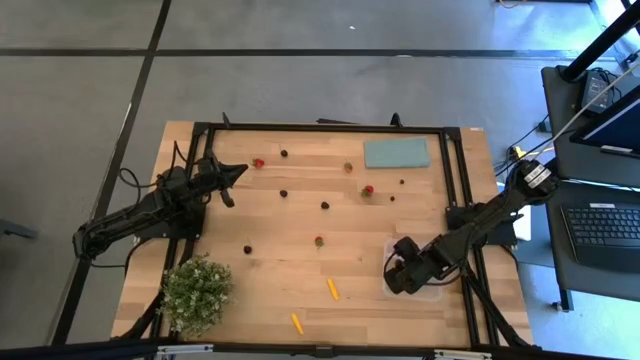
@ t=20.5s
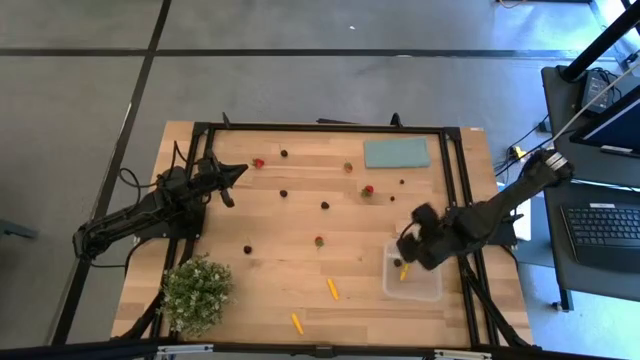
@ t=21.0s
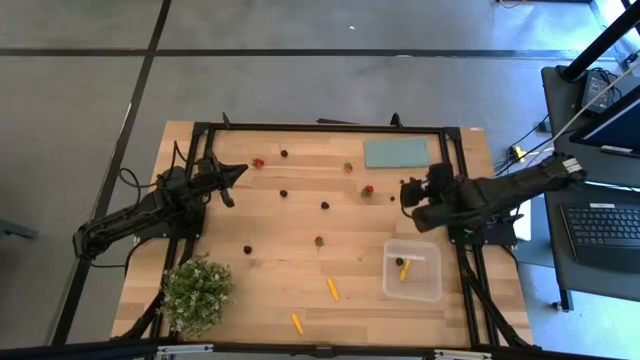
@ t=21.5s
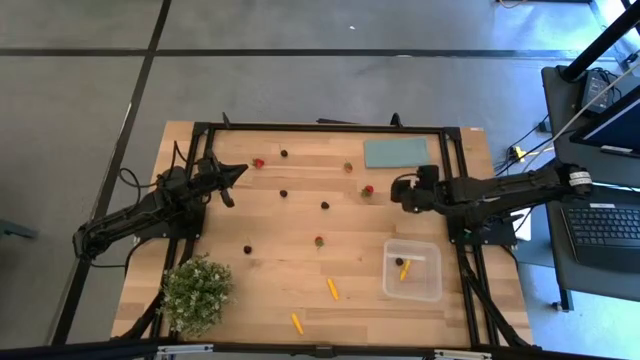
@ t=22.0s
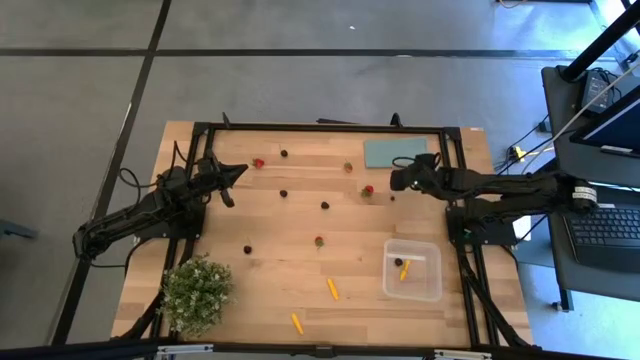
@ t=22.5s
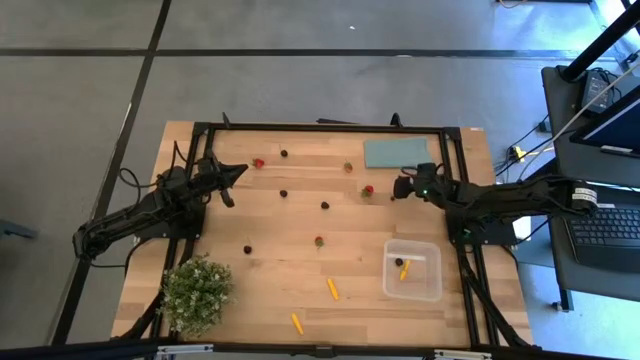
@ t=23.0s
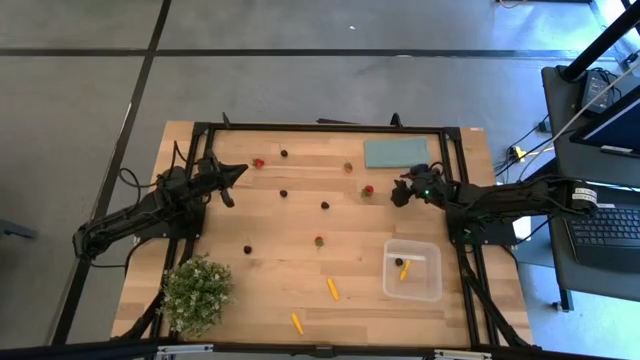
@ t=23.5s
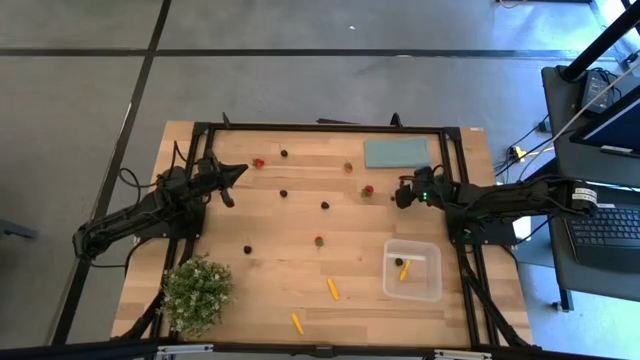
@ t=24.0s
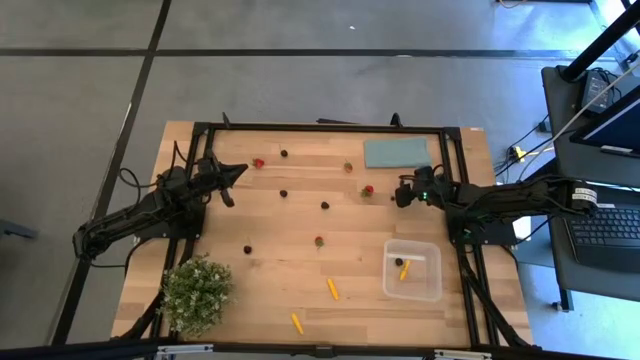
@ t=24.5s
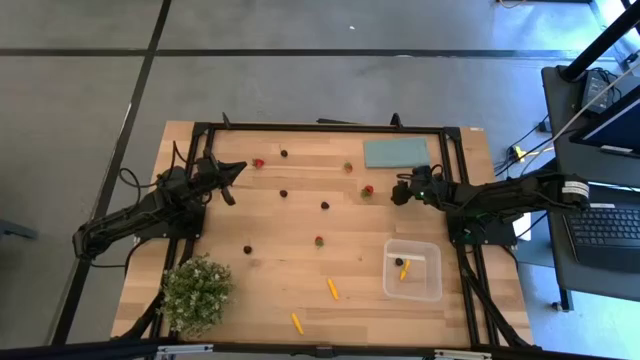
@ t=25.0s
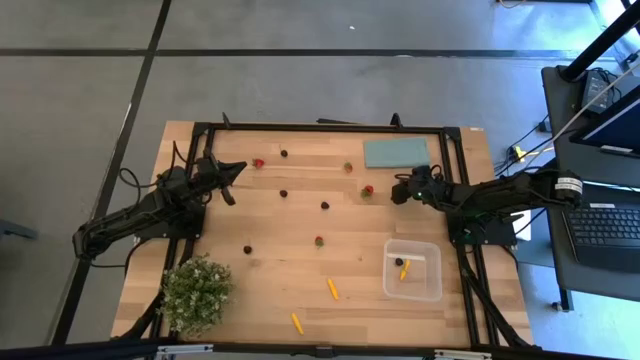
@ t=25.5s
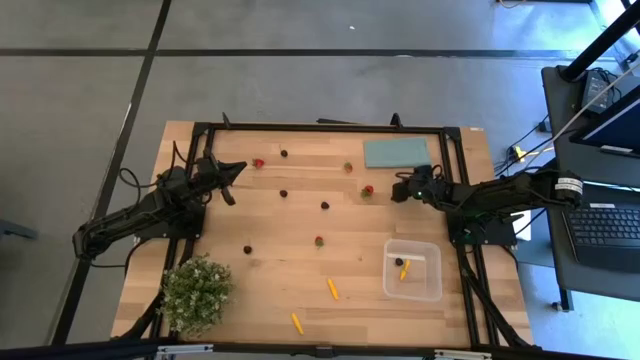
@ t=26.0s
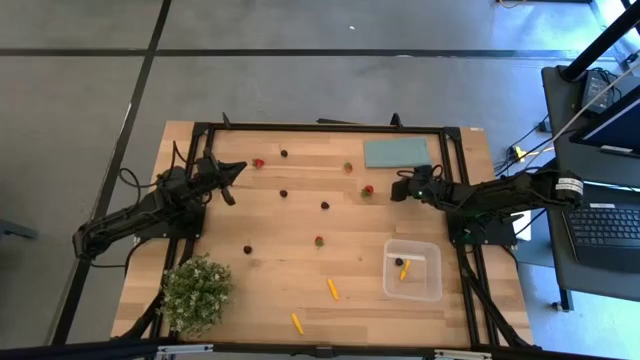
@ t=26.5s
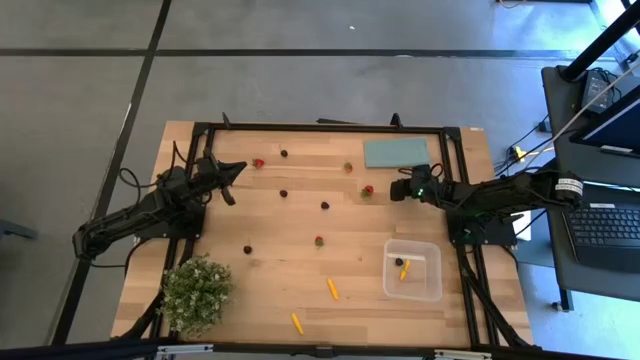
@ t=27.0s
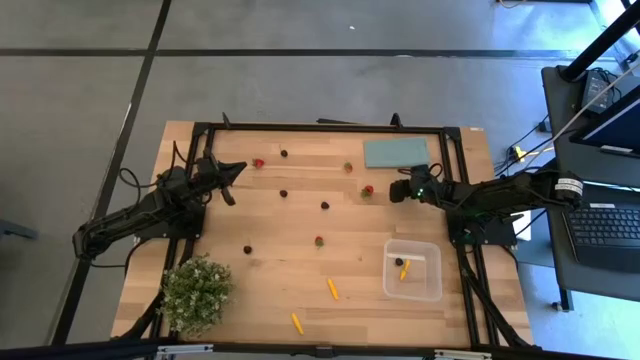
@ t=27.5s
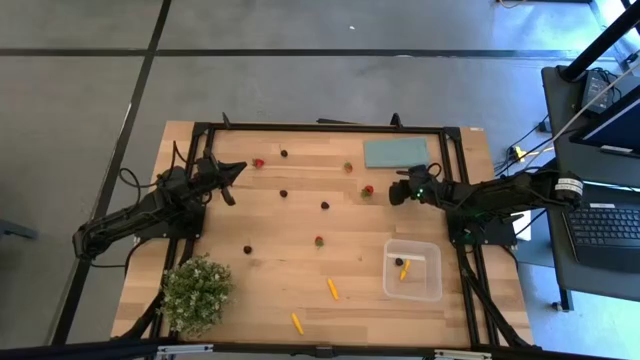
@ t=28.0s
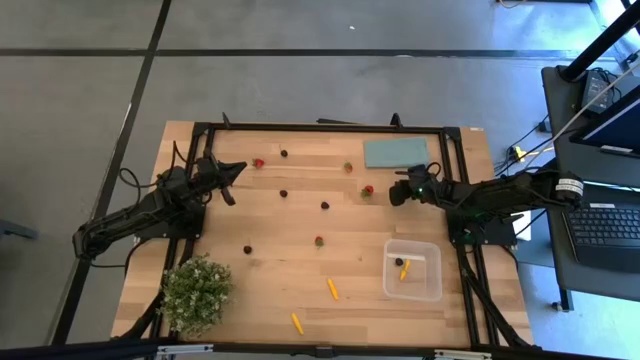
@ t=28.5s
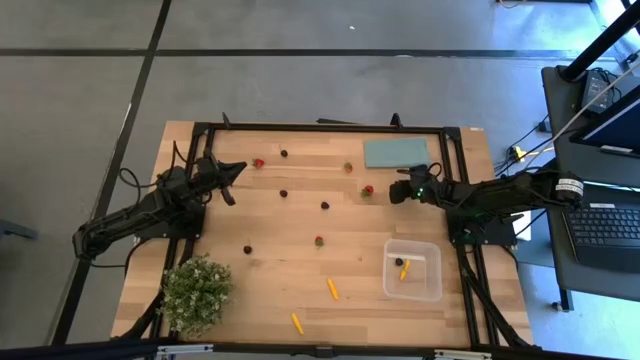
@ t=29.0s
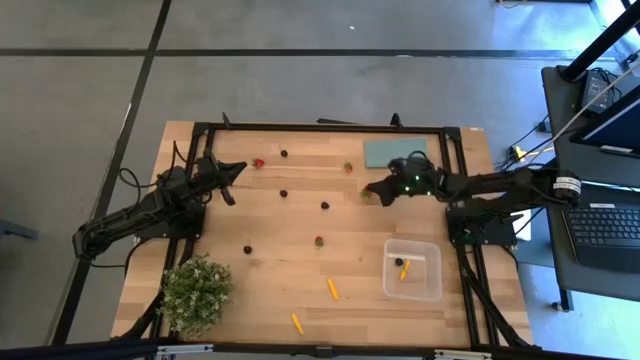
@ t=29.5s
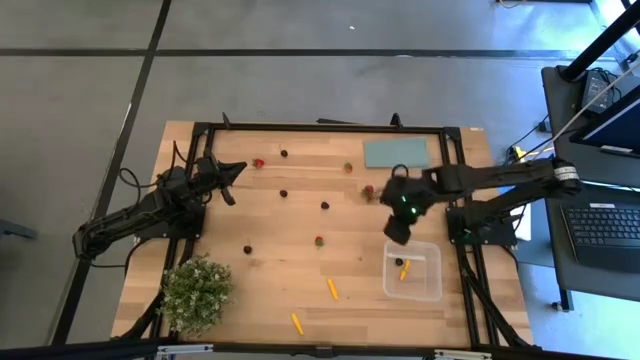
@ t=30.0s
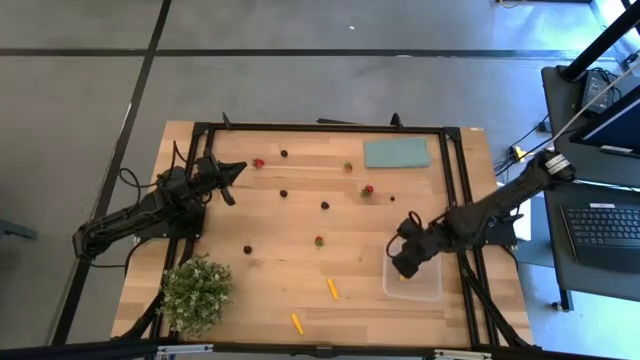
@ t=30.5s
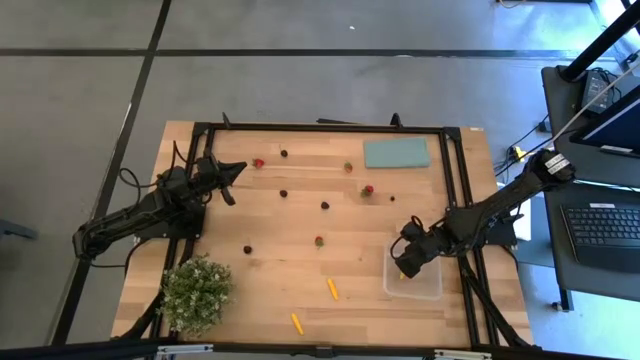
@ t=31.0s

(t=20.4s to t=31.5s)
Task: Pick and placing Produce into tupperware
Put the top blueberry into the container

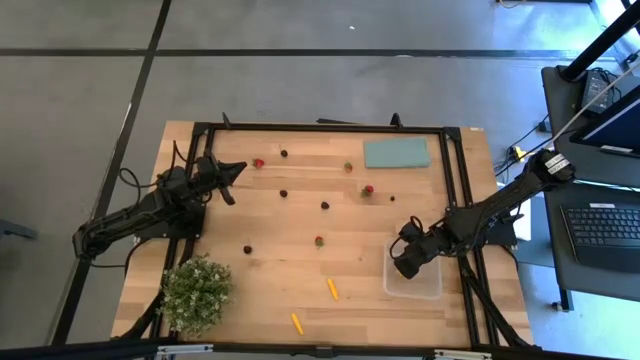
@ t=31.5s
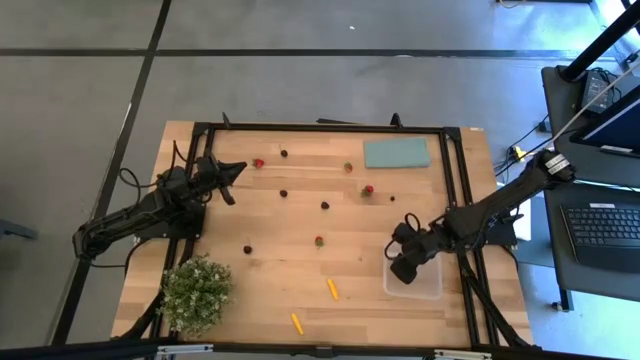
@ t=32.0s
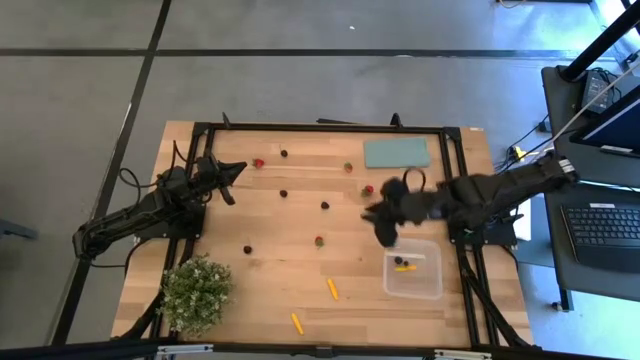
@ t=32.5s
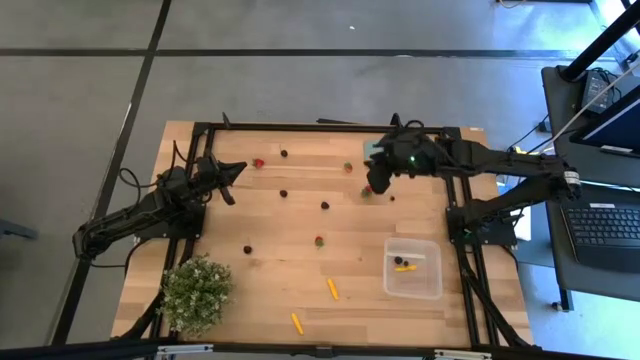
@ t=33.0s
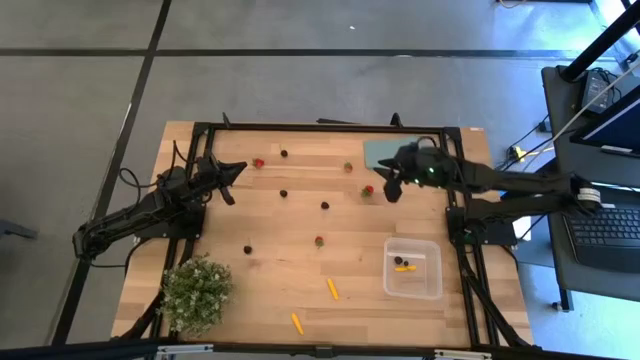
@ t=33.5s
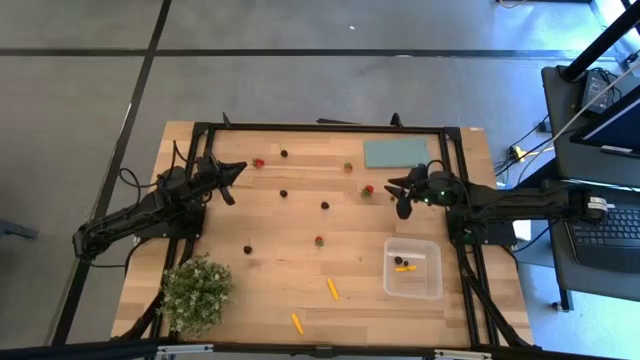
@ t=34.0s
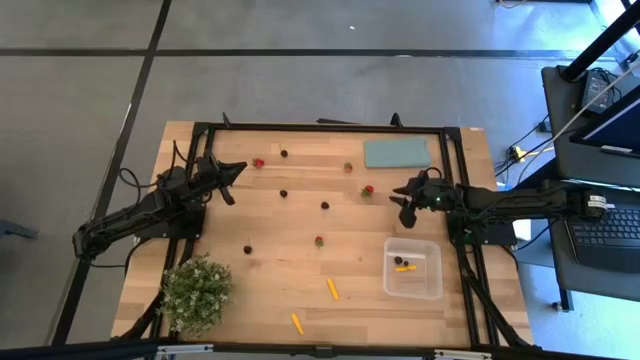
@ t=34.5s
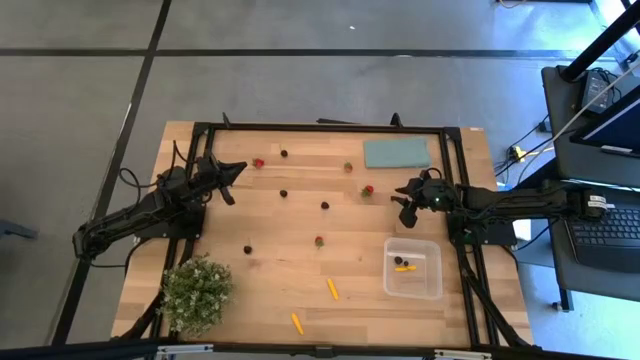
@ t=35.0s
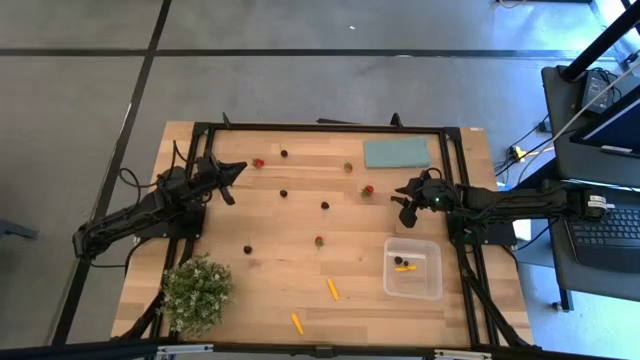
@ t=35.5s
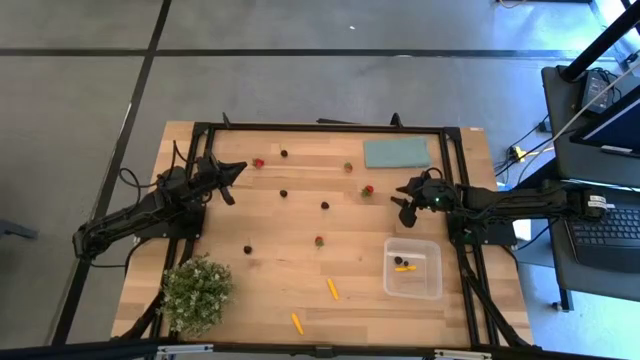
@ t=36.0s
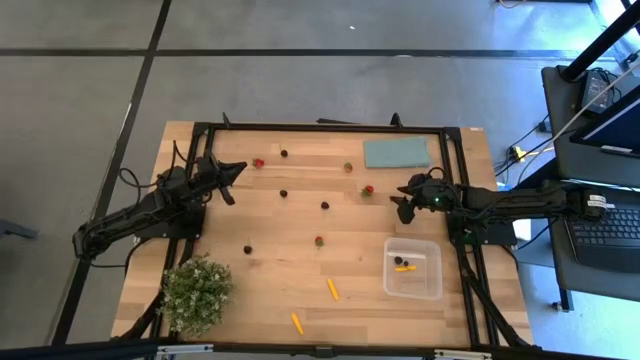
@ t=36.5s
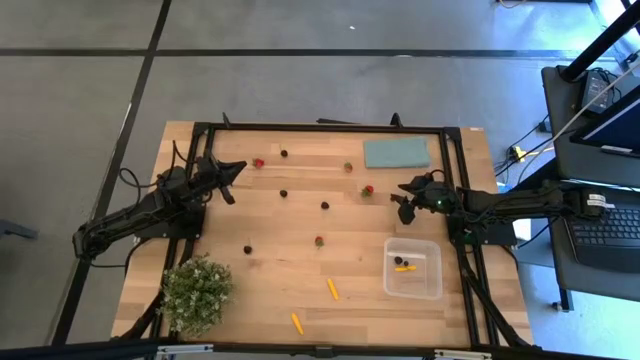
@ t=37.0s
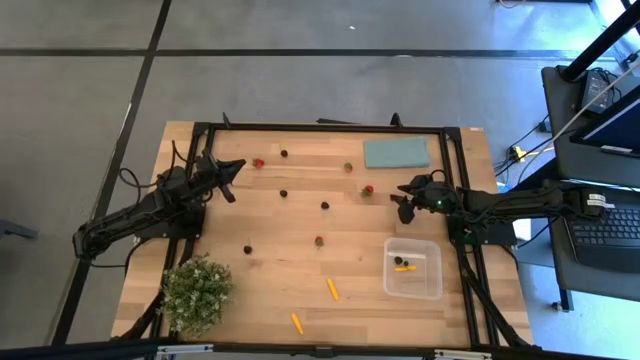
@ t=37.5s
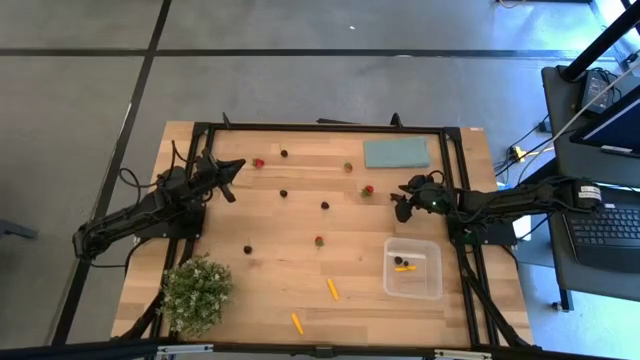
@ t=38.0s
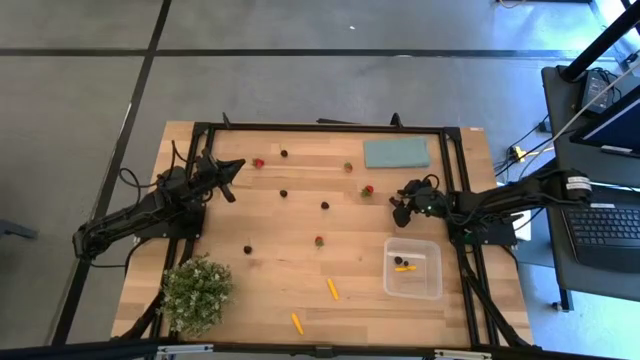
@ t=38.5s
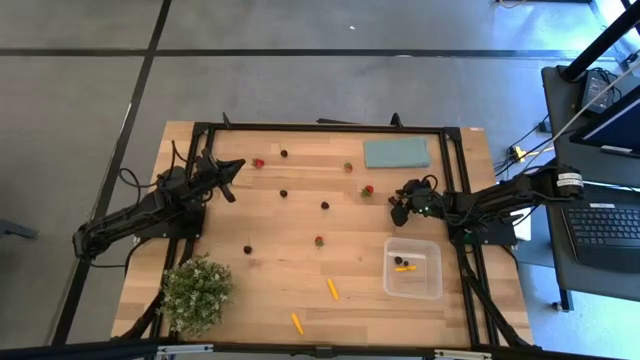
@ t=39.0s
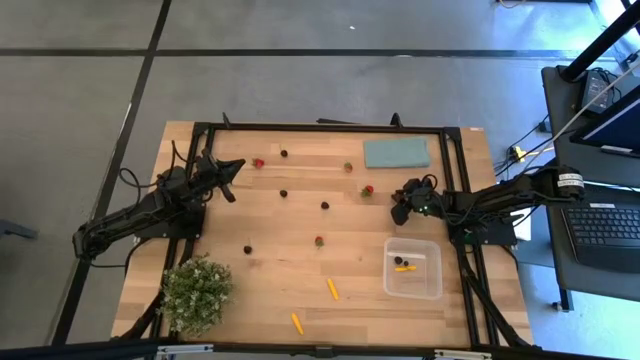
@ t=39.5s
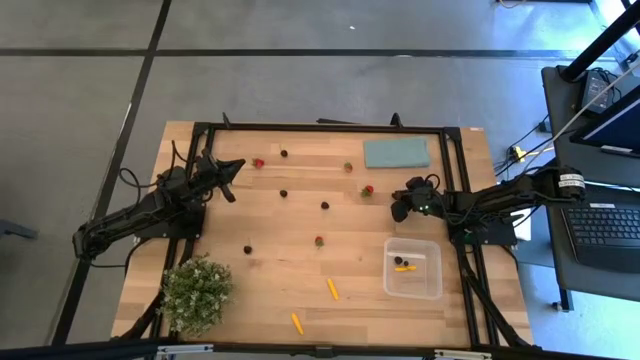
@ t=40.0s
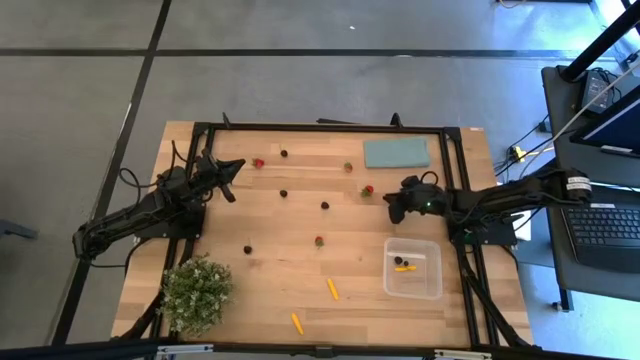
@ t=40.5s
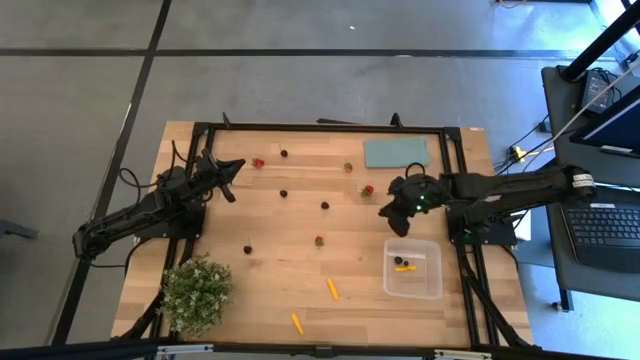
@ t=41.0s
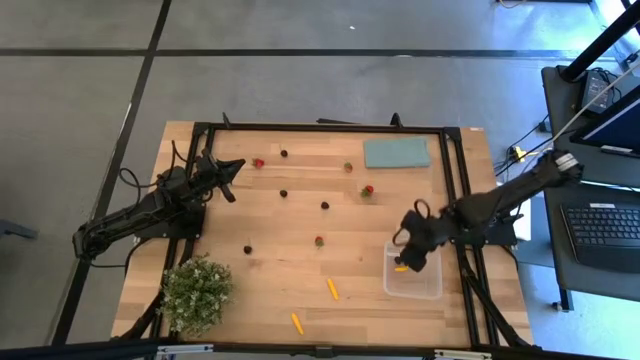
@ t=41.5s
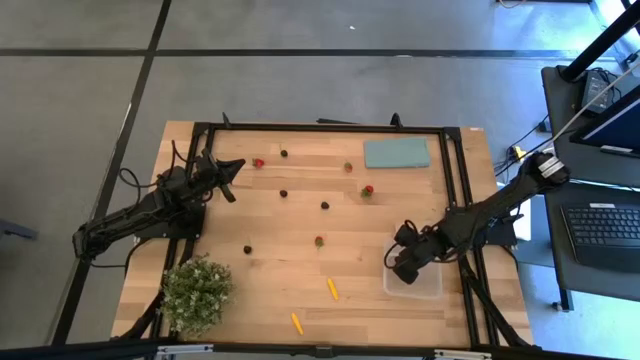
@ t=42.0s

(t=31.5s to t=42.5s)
Put the blueberry into the container
